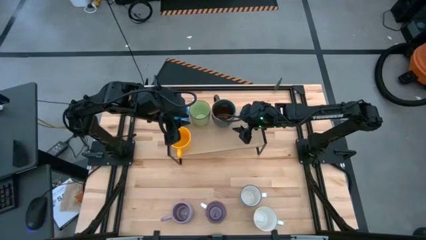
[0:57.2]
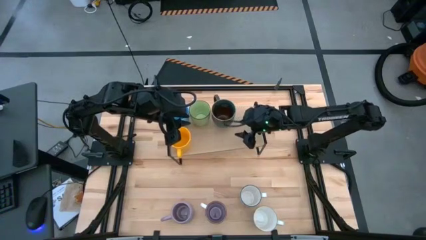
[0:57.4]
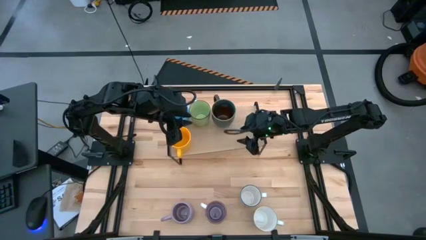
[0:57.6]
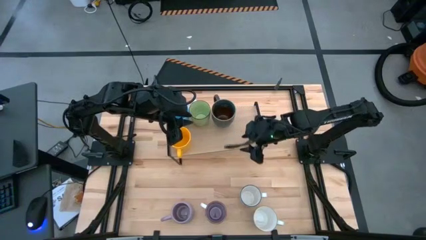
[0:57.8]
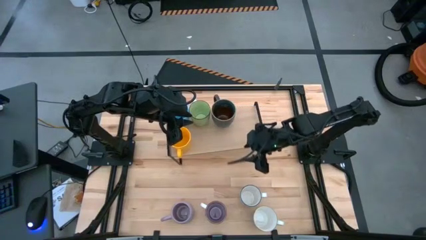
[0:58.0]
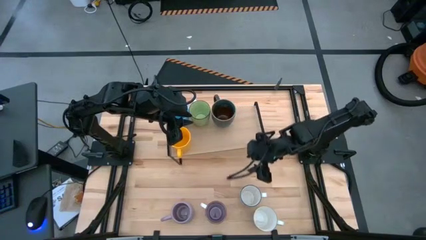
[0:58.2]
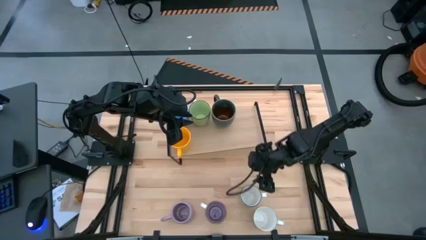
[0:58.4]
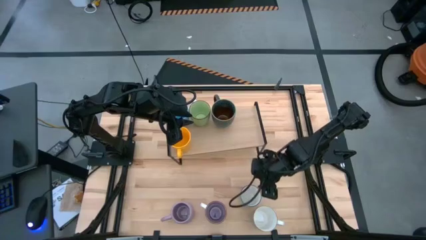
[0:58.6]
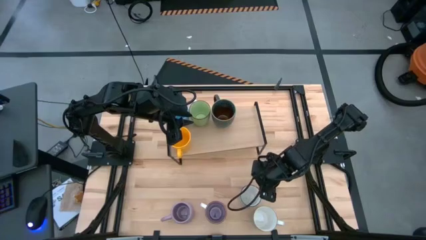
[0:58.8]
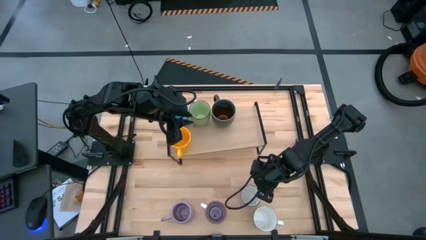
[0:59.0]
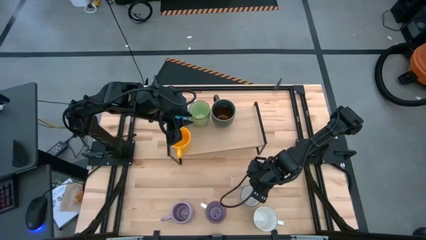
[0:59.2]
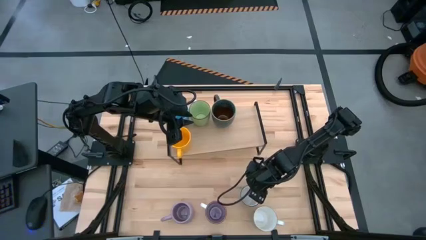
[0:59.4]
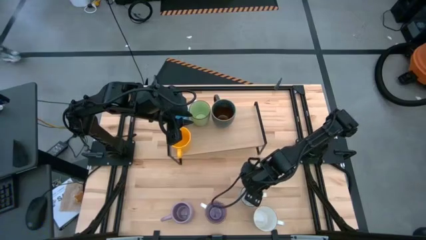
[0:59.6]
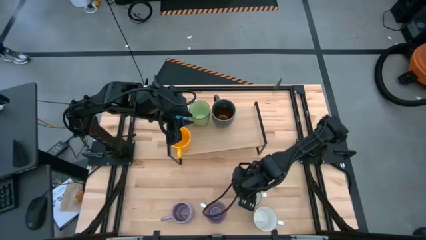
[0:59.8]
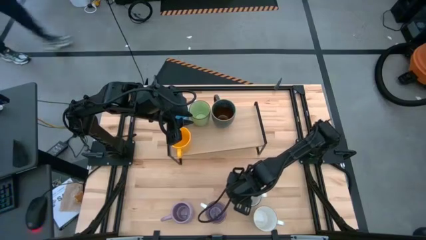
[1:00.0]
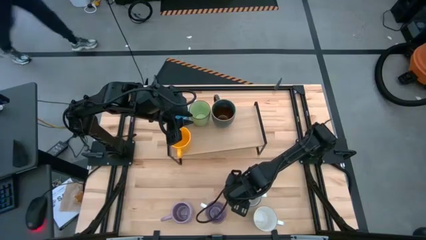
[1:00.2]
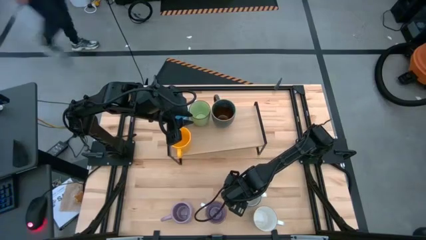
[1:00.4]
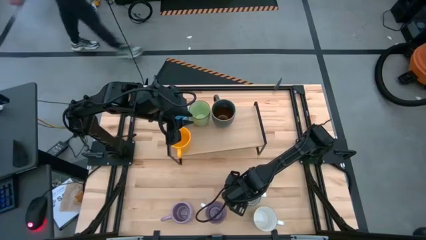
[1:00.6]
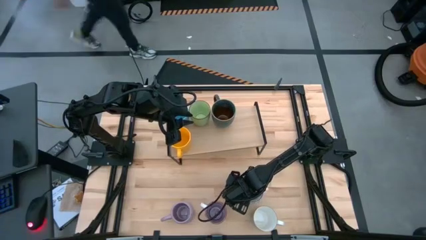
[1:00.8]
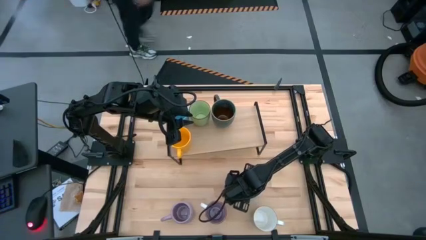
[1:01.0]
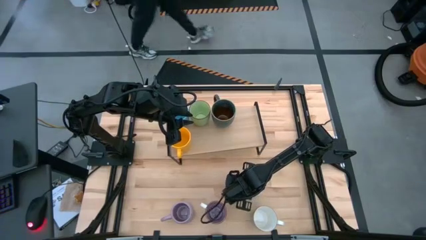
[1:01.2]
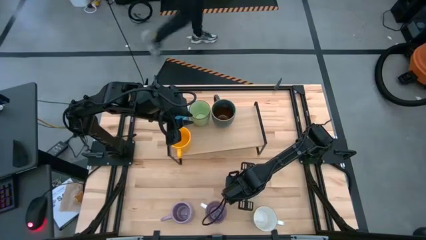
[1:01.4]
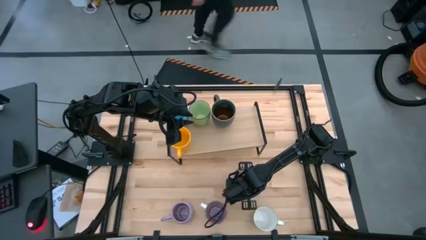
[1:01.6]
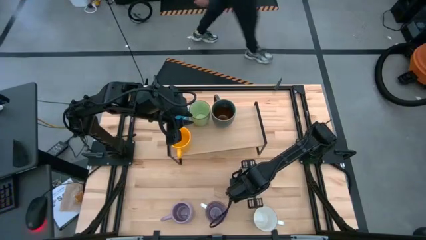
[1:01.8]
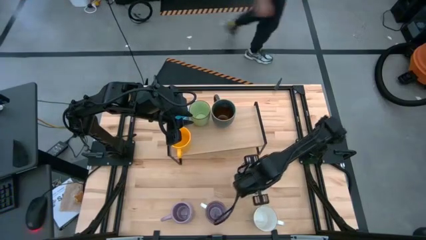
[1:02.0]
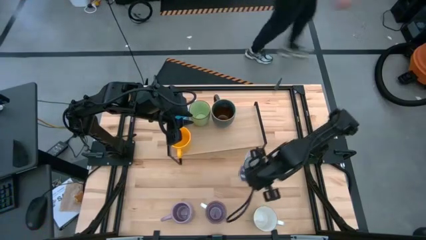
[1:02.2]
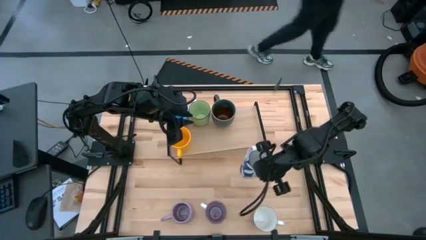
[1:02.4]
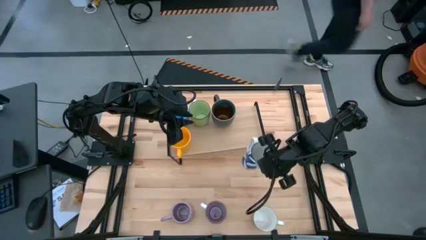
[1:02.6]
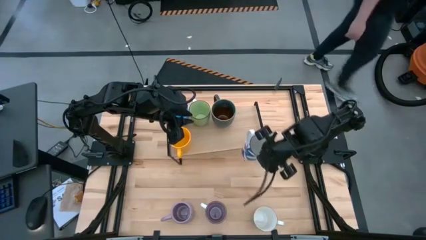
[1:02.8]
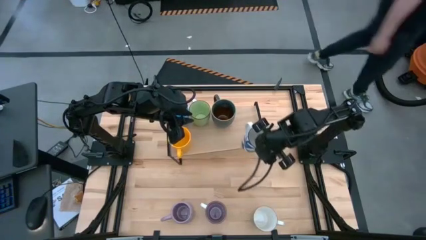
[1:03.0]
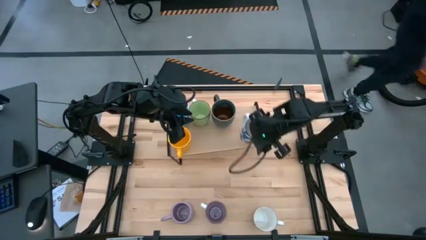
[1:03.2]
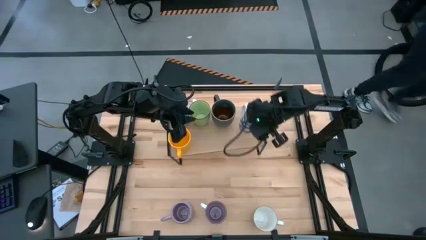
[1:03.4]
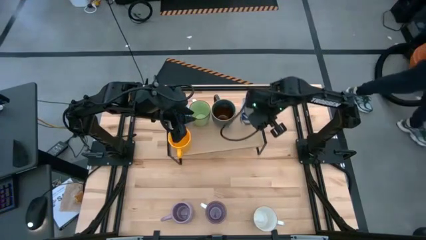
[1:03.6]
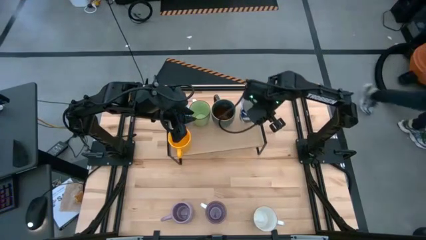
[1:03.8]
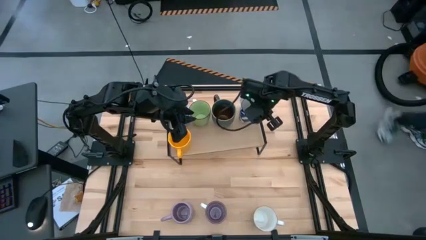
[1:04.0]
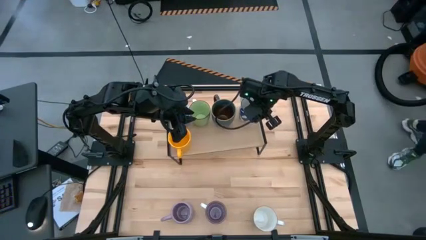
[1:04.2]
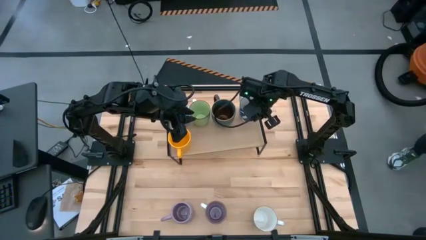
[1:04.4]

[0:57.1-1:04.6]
Task: Place coffee mugs
Put the white-blue patterned mug on the shelf
